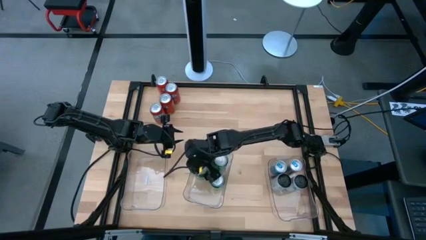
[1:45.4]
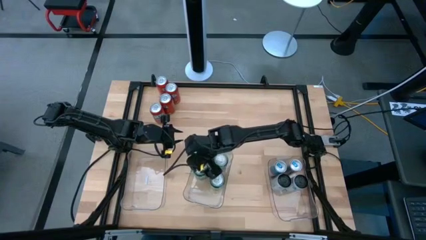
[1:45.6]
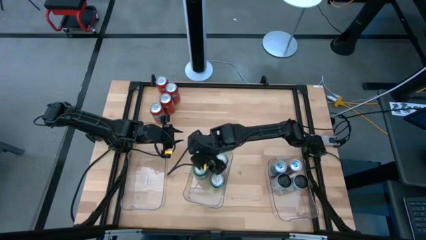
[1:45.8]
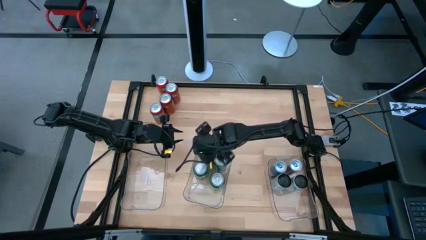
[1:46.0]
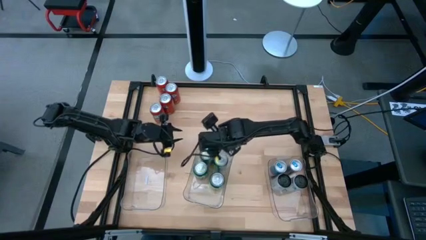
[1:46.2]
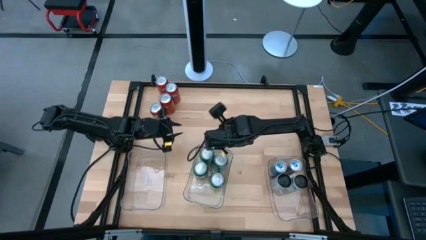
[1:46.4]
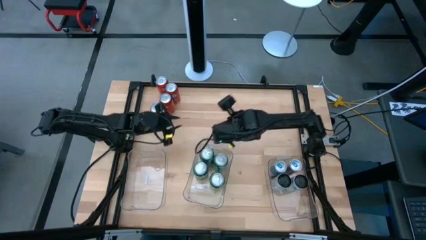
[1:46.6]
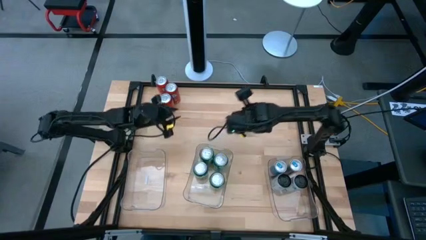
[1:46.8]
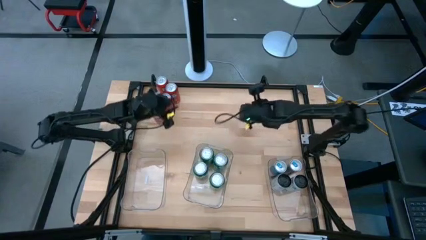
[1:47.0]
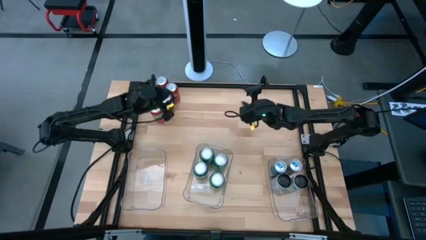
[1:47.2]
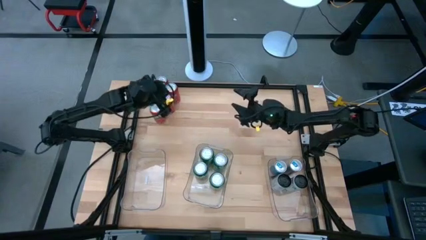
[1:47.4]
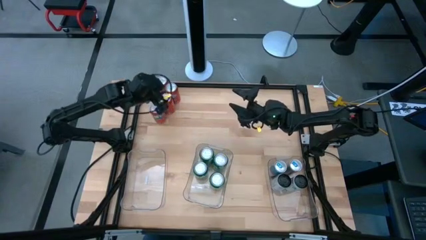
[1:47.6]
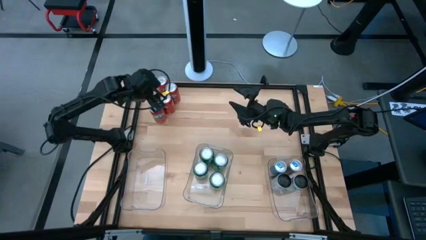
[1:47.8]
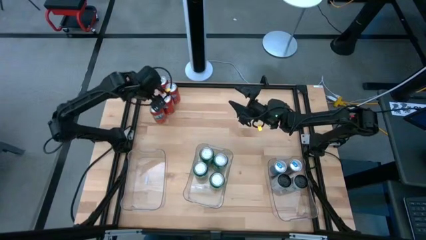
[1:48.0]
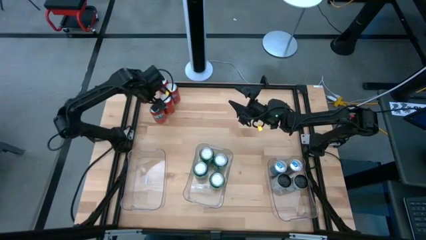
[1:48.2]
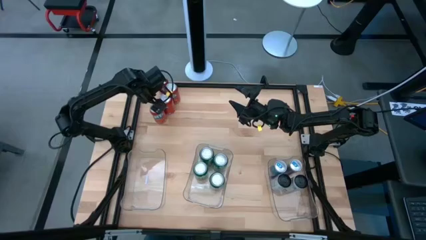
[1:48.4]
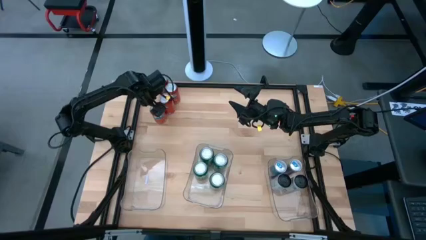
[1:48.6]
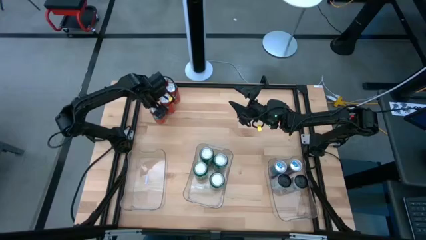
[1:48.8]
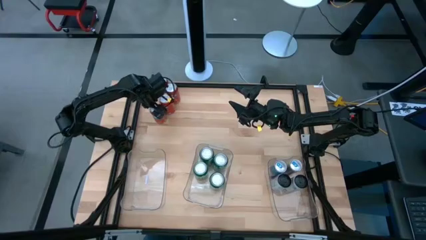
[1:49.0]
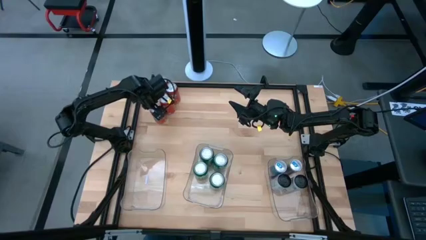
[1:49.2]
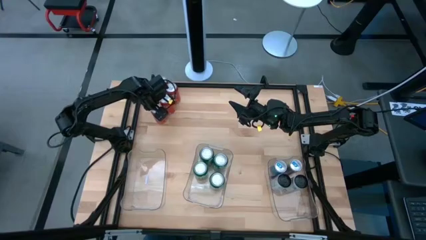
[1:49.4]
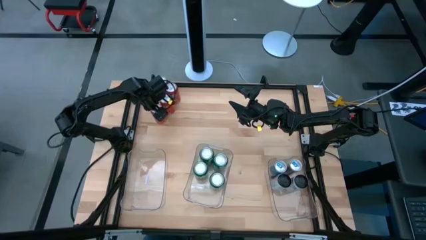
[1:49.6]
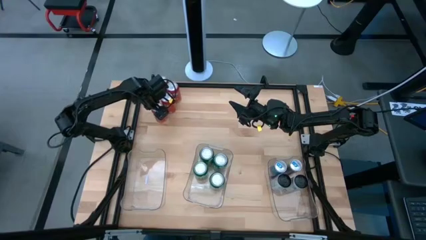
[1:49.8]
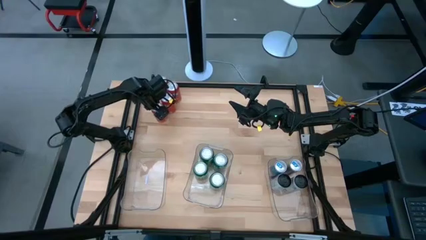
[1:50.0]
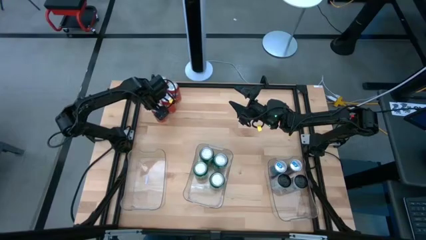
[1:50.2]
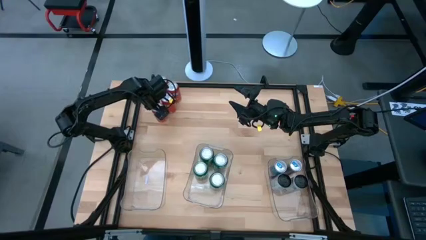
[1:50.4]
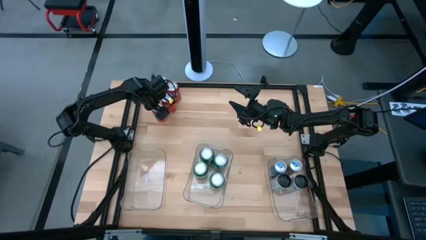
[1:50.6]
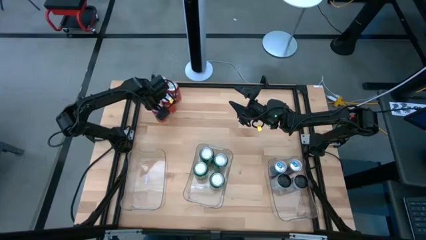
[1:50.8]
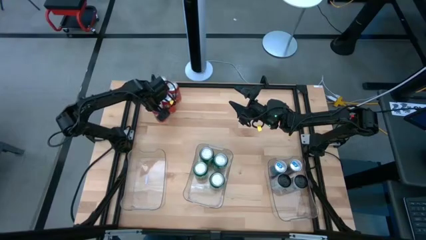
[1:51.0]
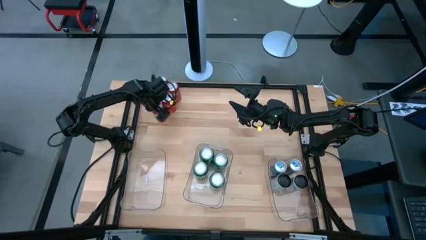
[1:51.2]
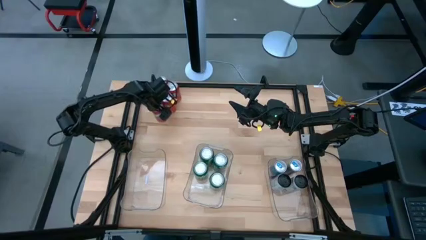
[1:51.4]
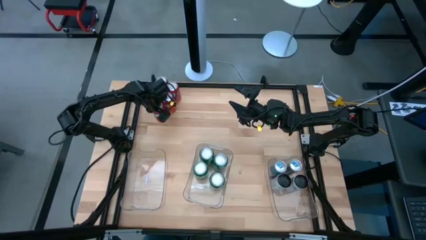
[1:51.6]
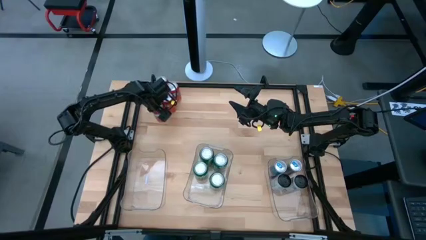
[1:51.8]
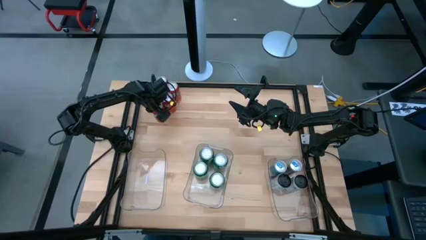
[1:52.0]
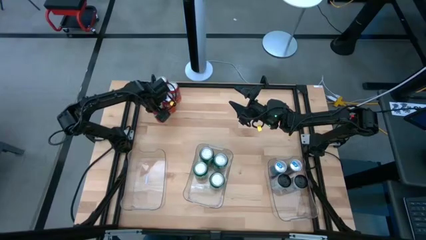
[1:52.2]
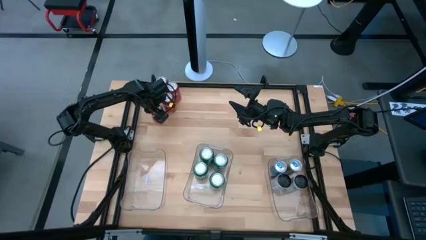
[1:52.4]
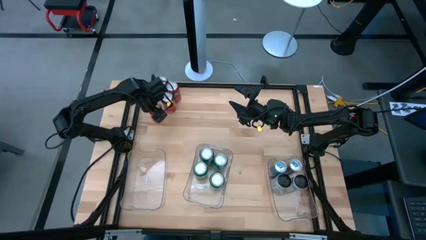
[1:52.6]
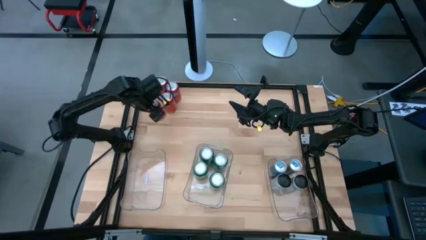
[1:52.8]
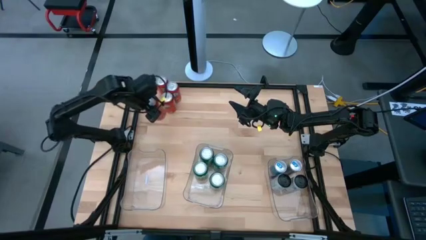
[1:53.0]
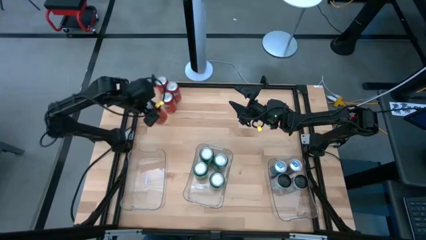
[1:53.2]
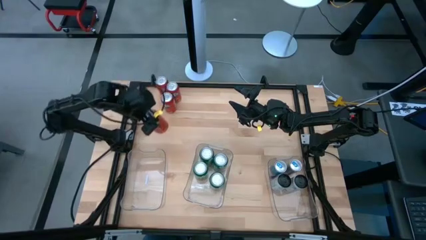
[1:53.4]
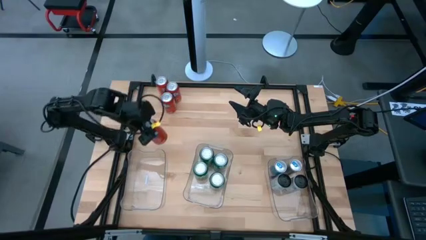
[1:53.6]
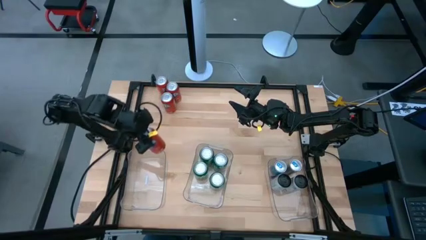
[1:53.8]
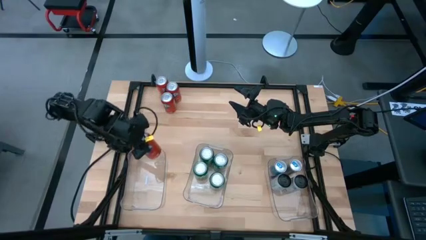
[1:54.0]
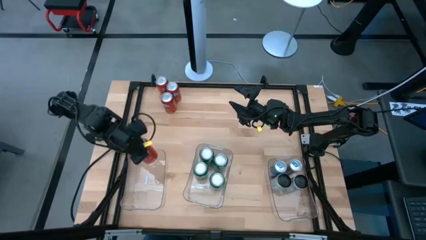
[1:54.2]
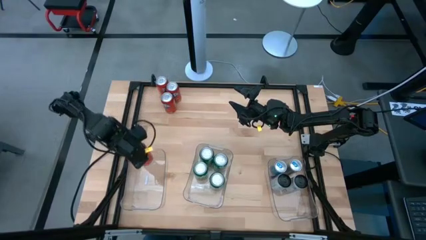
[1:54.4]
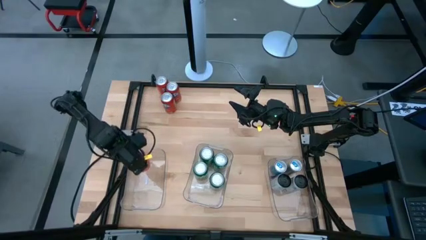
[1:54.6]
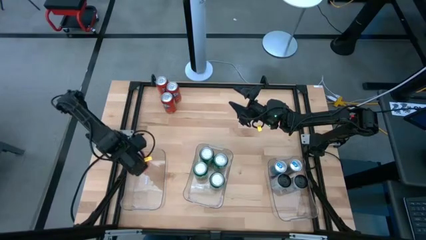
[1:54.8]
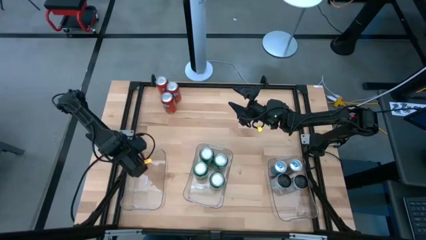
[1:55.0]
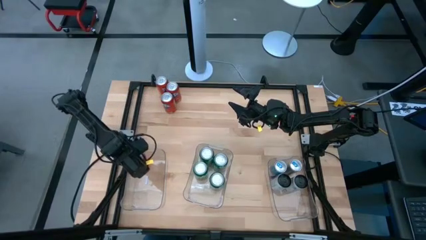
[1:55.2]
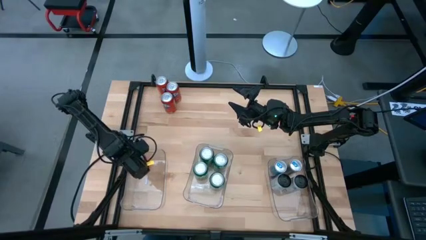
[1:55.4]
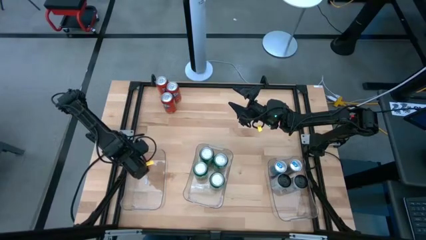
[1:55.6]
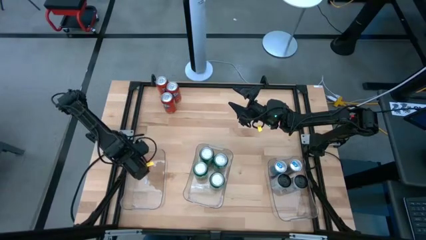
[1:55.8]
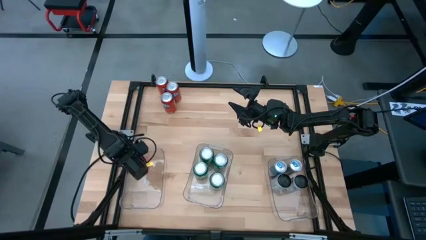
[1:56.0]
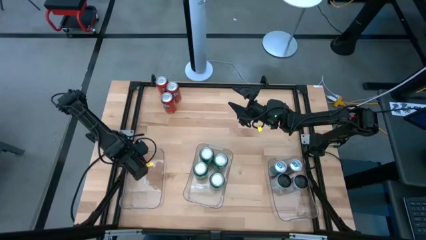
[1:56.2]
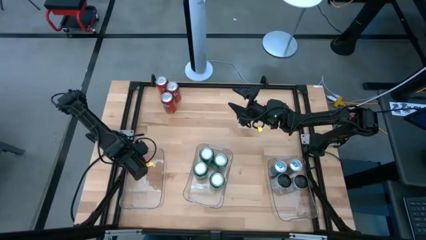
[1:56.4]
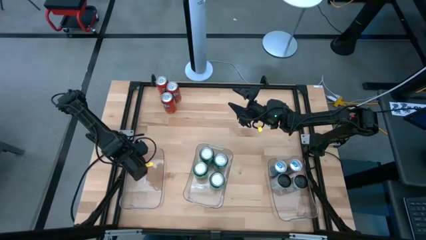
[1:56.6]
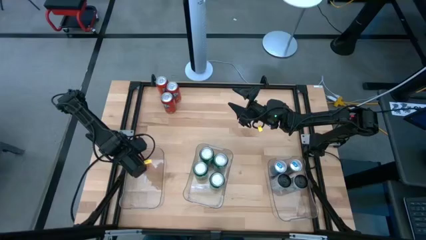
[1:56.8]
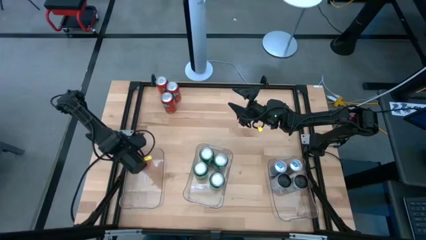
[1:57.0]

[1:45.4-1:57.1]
Task: Sort soda cans
Put the orange soda can into the left transparent bin
